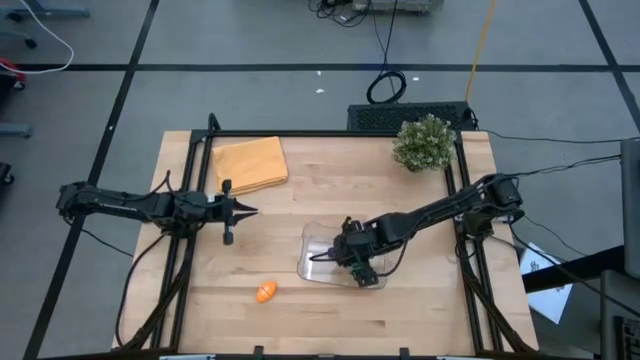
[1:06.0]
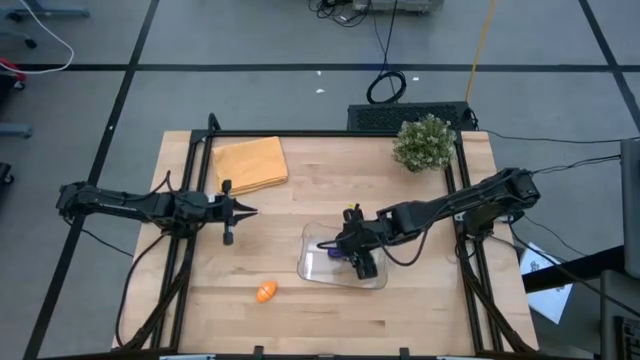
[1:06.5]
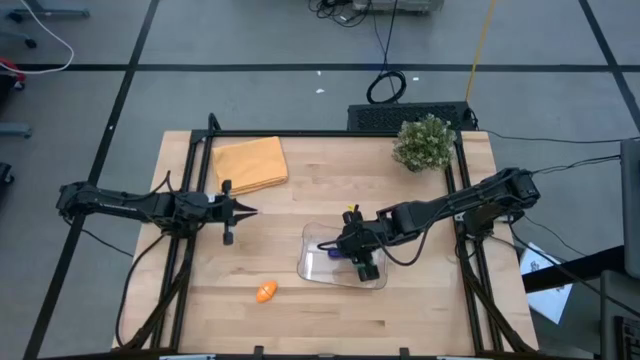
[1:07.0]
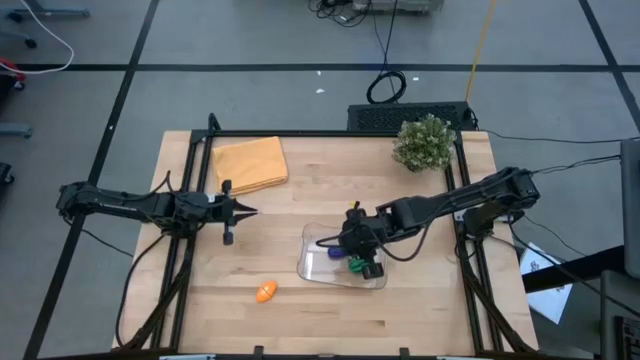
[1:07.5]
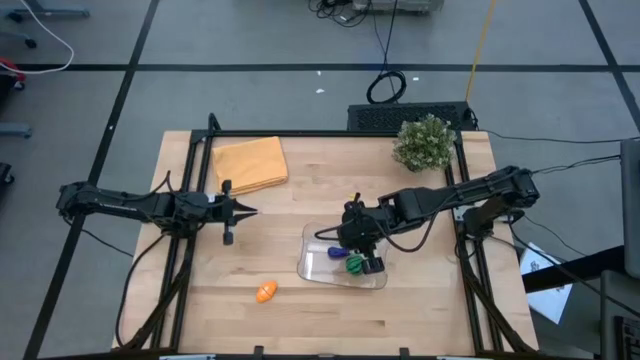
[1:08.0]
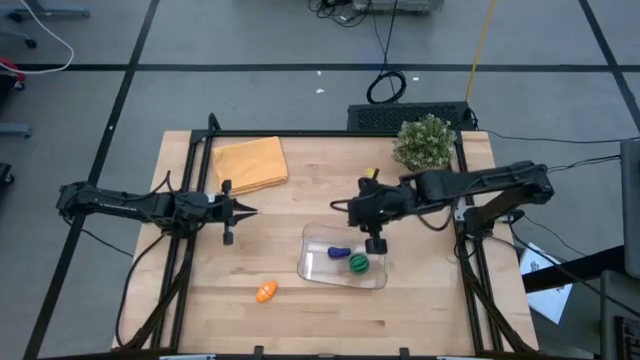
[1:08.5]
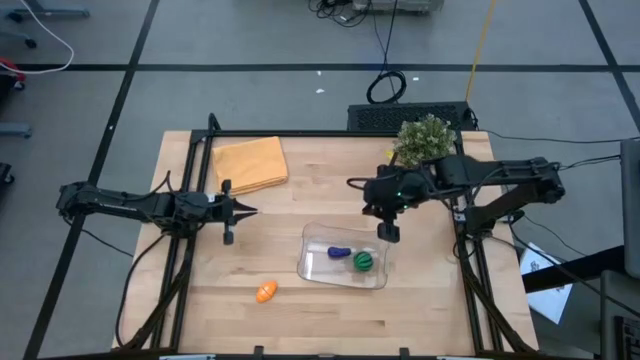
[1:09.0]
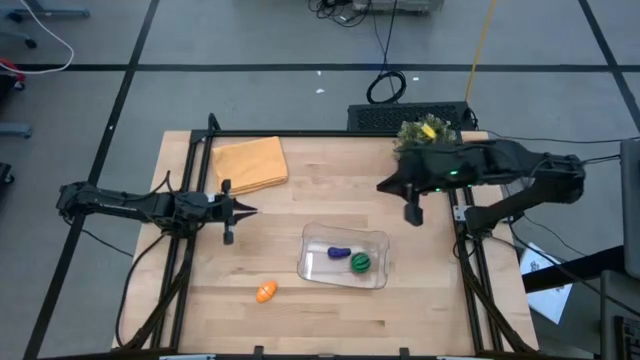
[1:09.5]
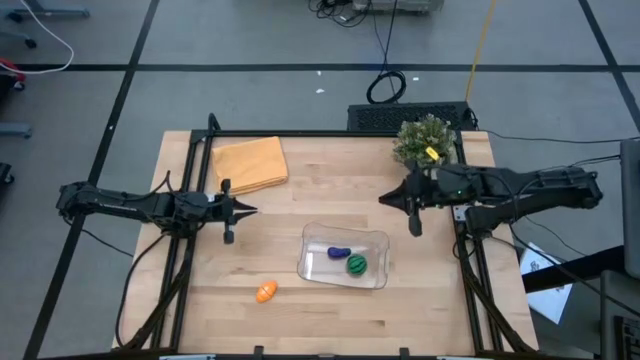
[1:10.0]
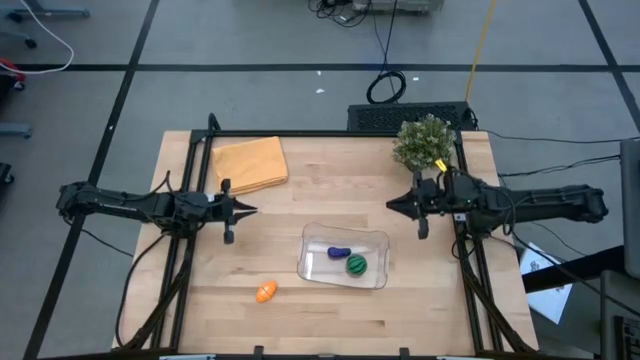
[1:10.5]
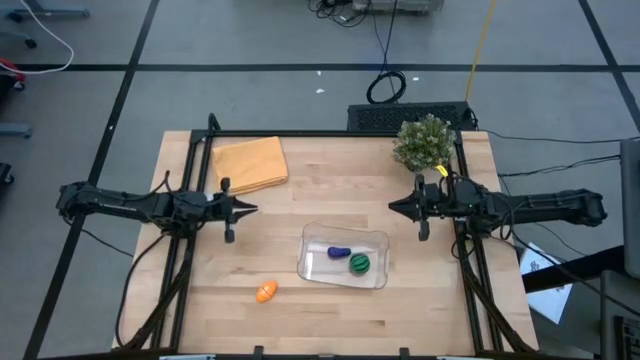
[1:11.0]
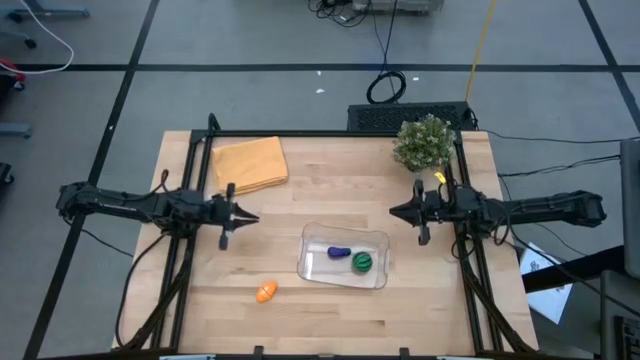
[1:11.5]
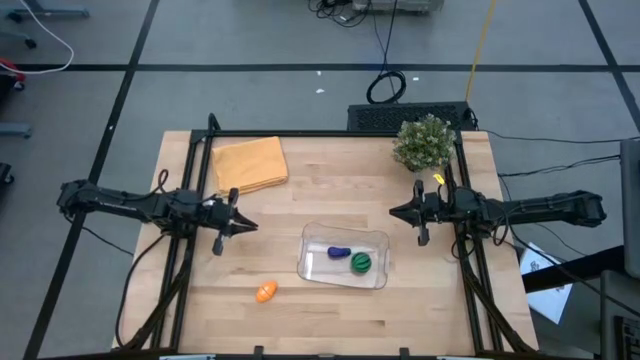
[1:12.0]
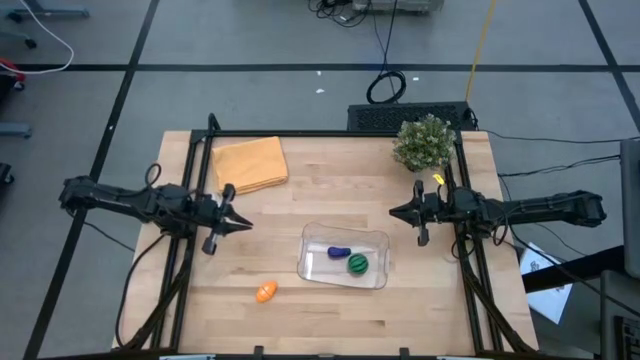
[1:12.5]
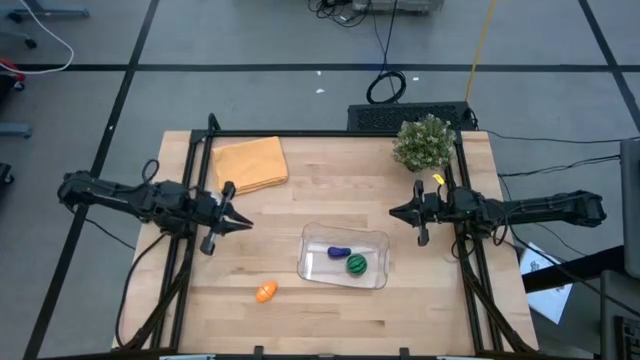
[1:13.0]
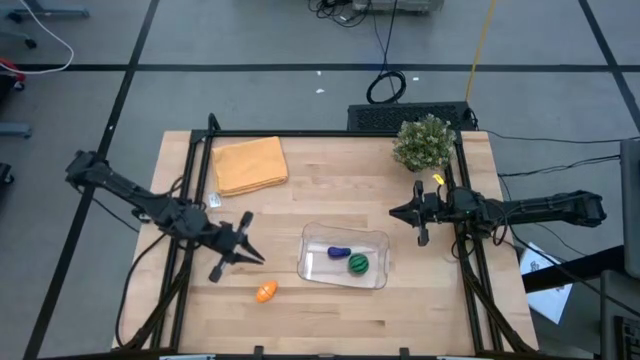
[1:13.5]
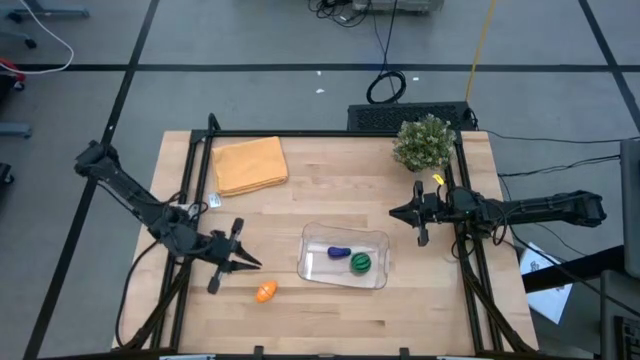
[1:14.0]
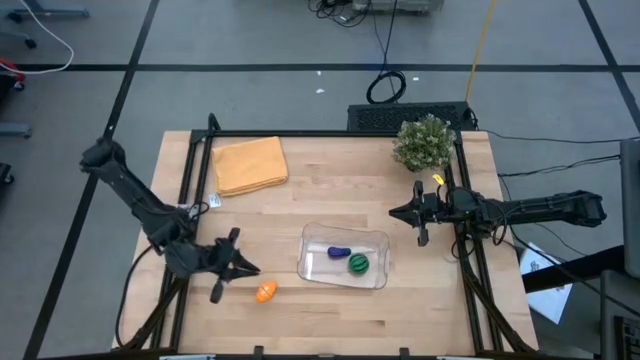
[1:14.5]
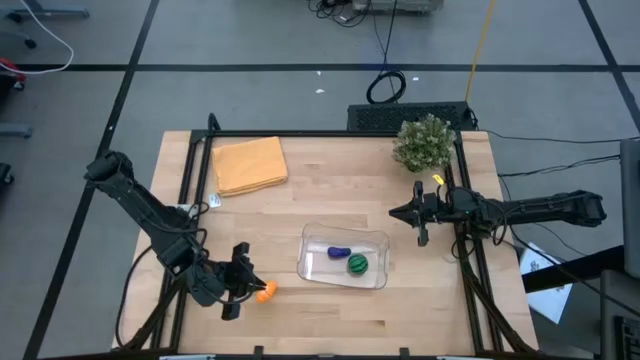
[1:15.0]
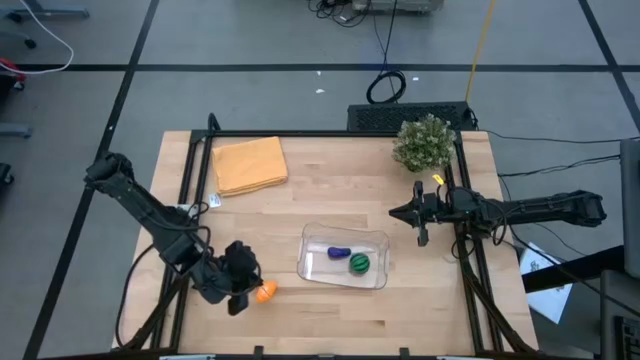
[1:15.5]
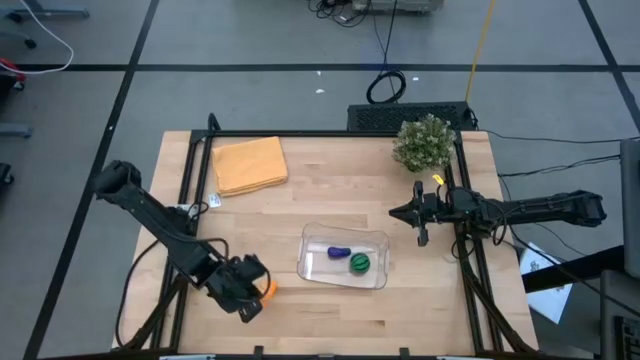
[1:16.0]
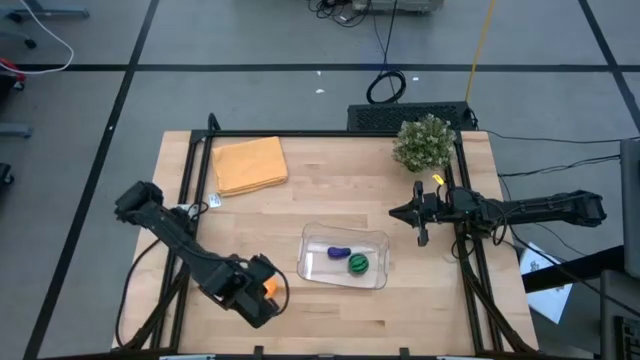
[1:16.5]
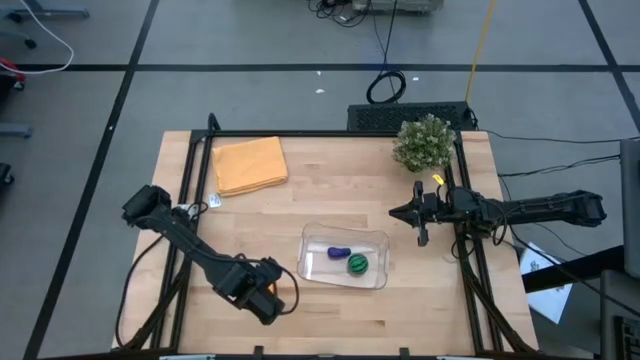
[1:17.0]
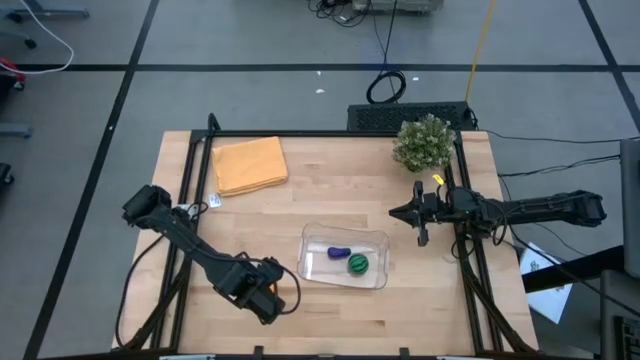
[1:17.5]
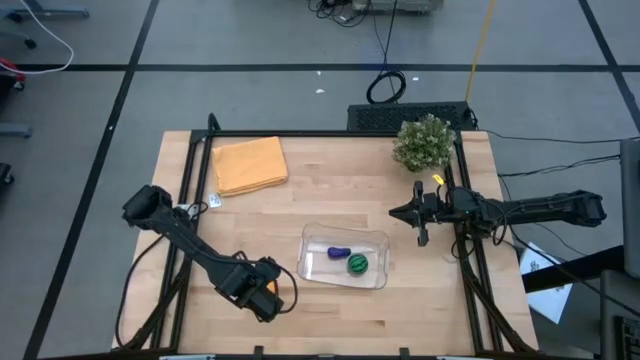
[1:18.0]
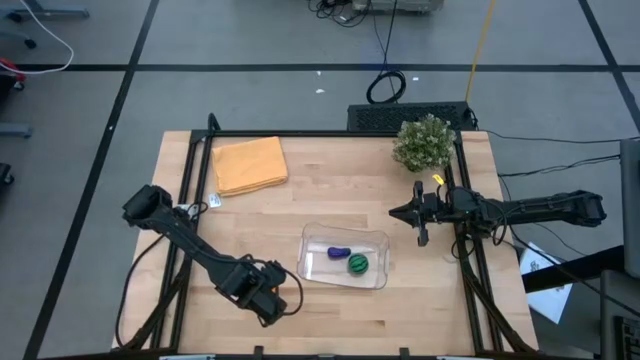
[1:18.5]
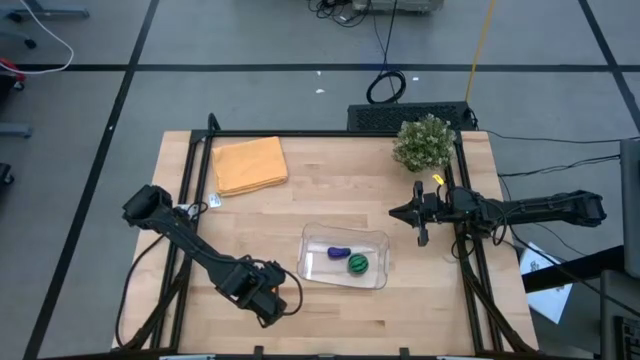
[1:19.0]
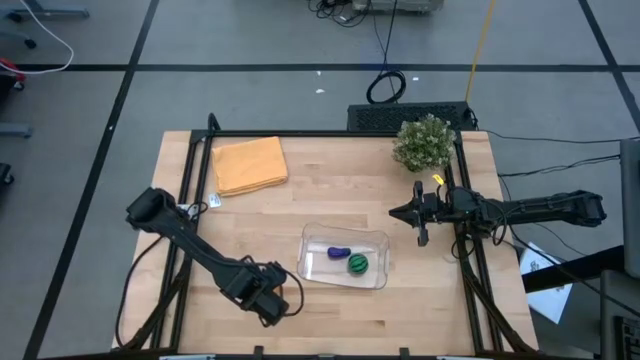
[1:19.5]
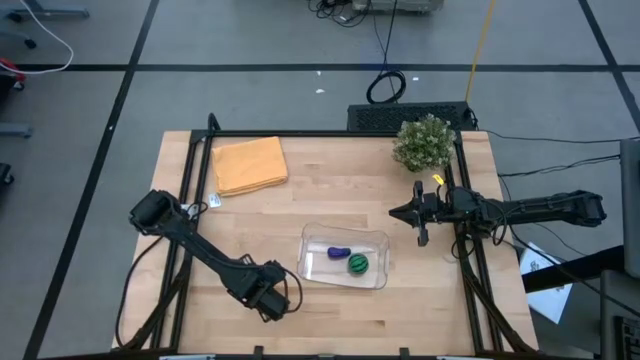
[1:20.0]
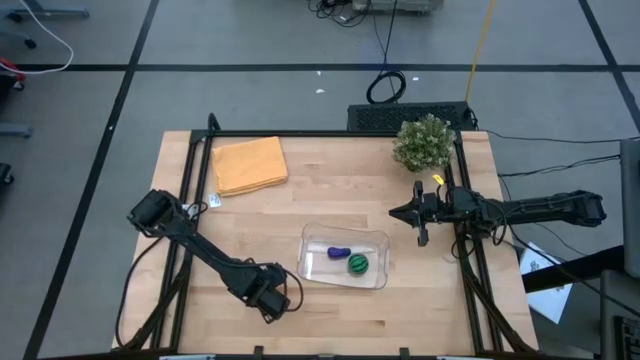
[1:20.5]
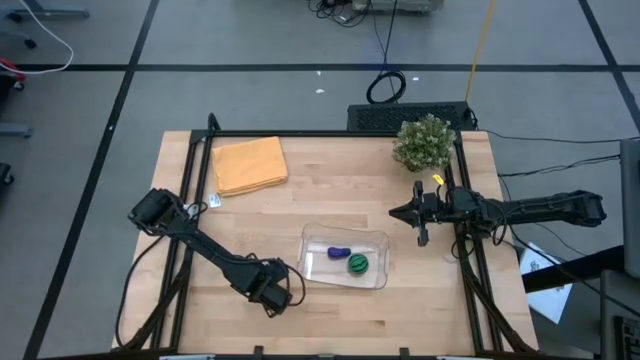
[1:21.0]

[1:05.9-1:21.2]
Task: Pick and placing Produce into tupperware
Put the orange croissant into the transparent bin
